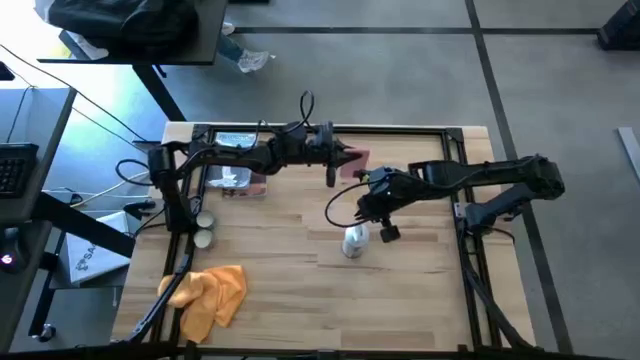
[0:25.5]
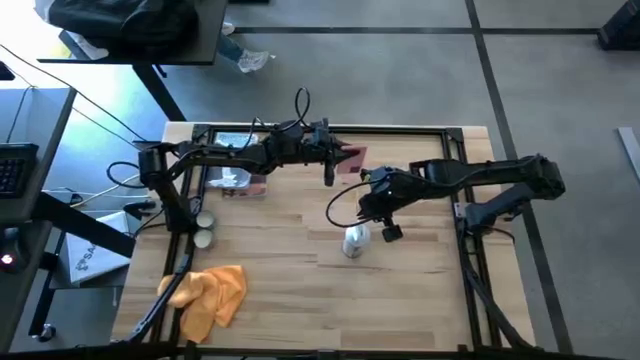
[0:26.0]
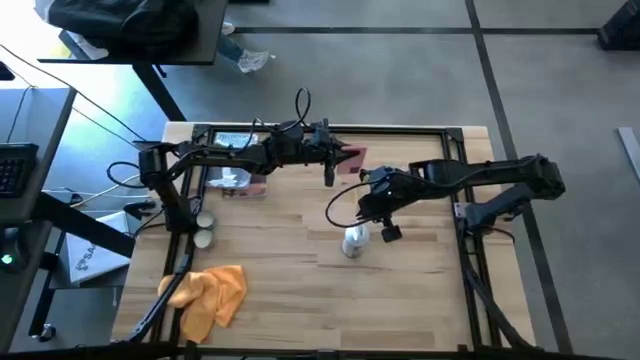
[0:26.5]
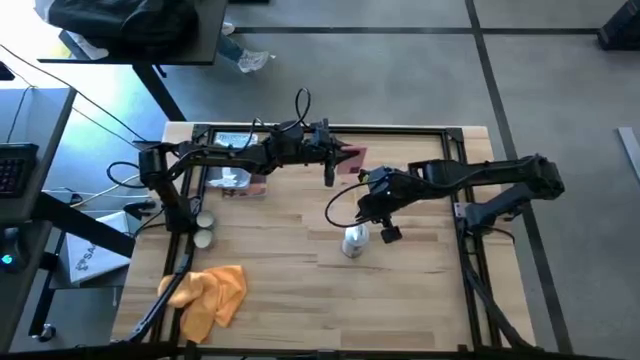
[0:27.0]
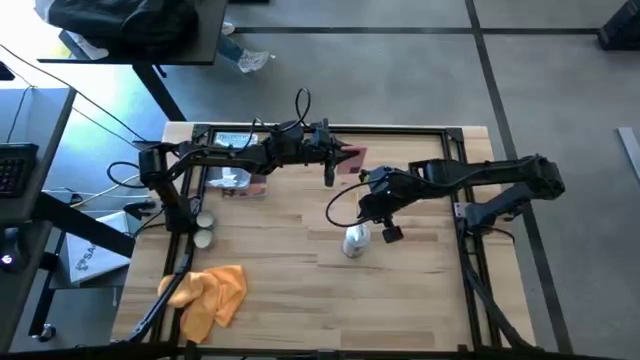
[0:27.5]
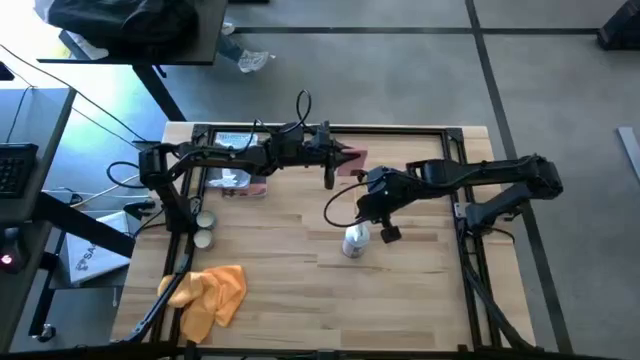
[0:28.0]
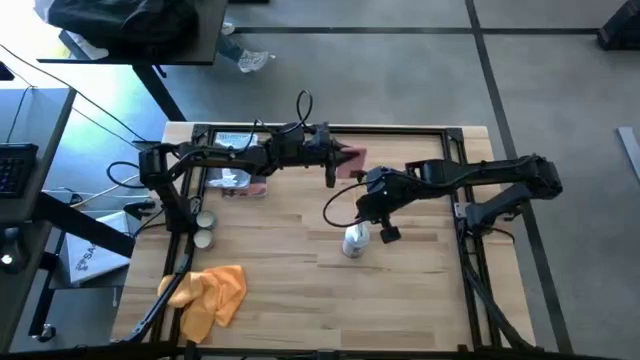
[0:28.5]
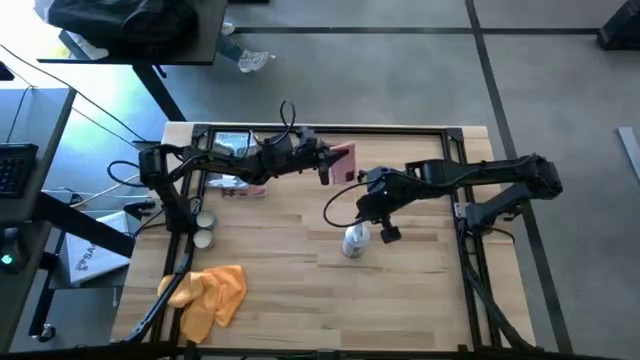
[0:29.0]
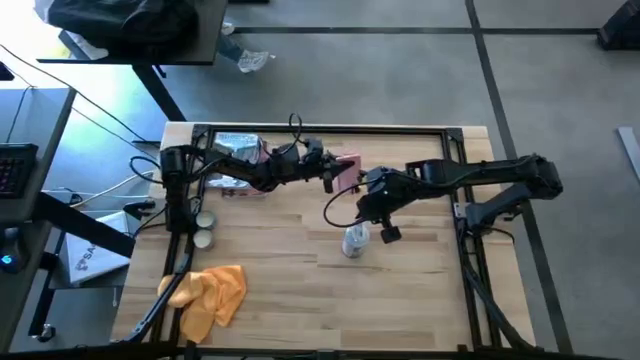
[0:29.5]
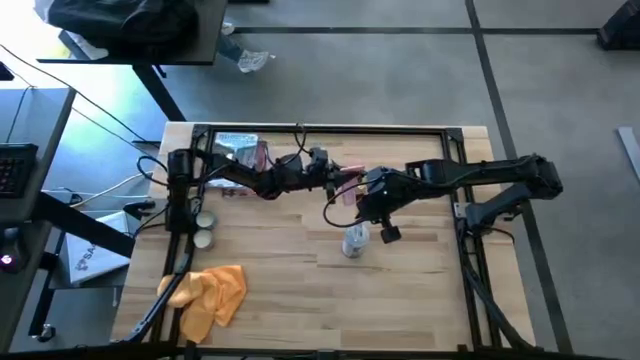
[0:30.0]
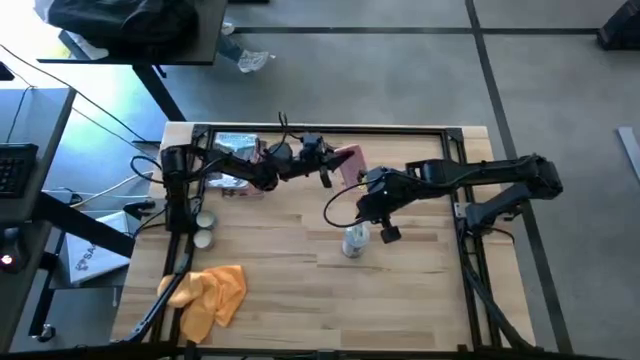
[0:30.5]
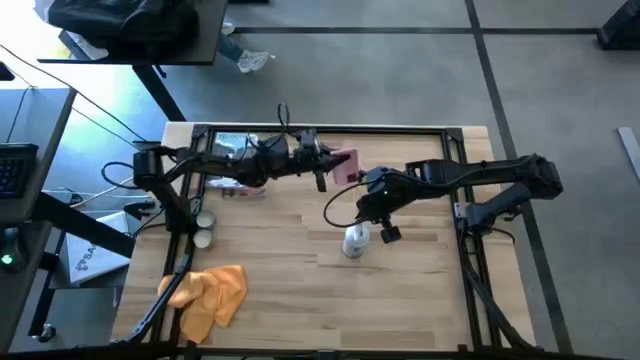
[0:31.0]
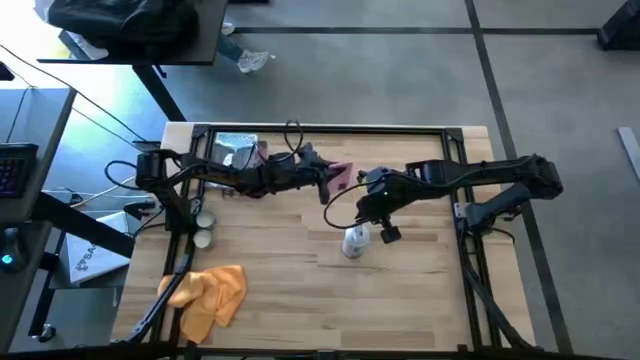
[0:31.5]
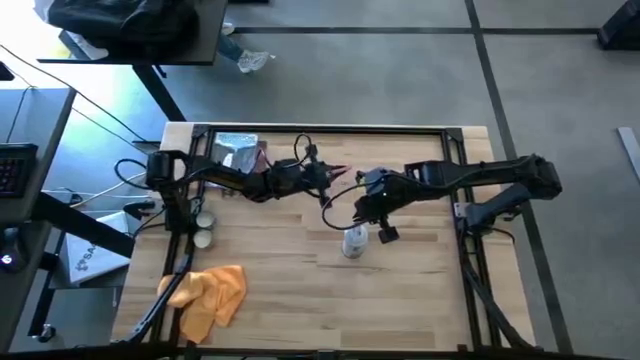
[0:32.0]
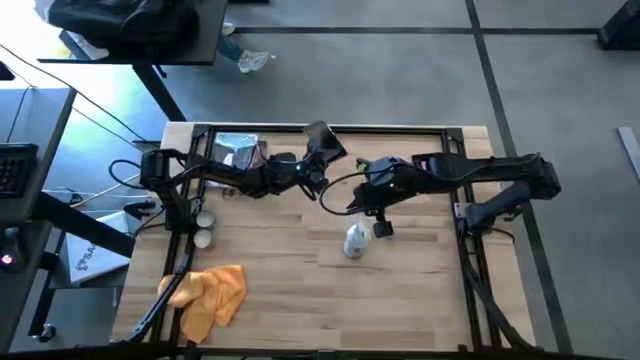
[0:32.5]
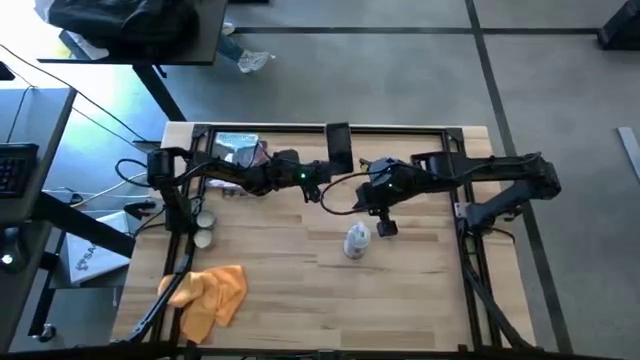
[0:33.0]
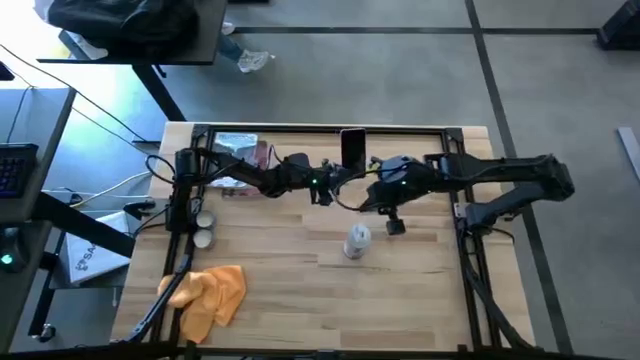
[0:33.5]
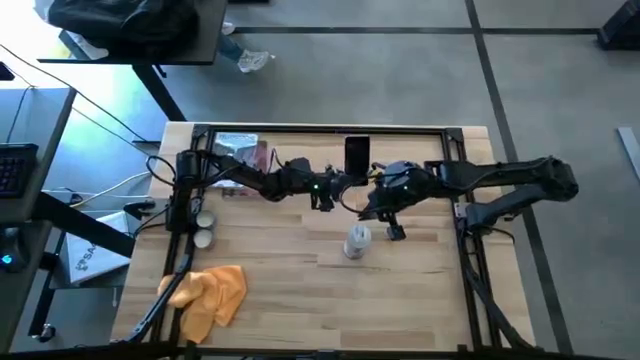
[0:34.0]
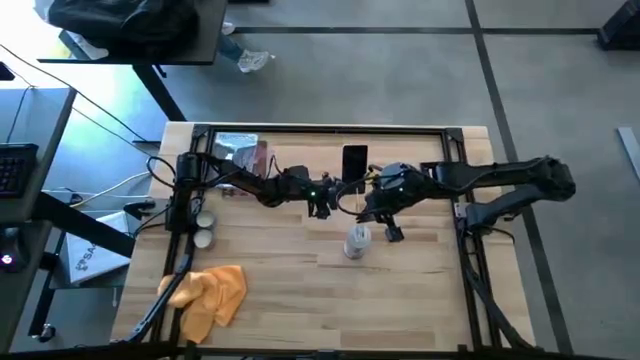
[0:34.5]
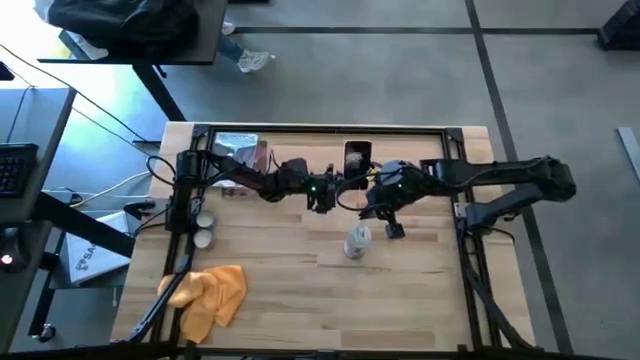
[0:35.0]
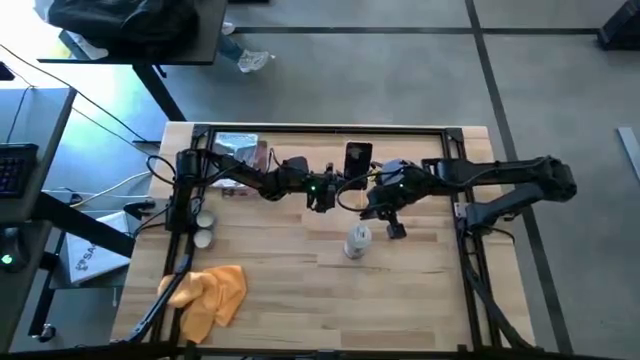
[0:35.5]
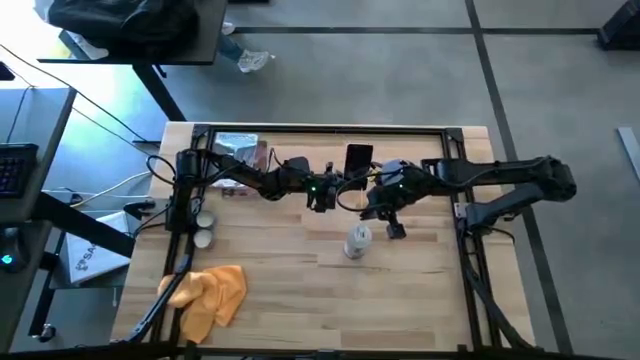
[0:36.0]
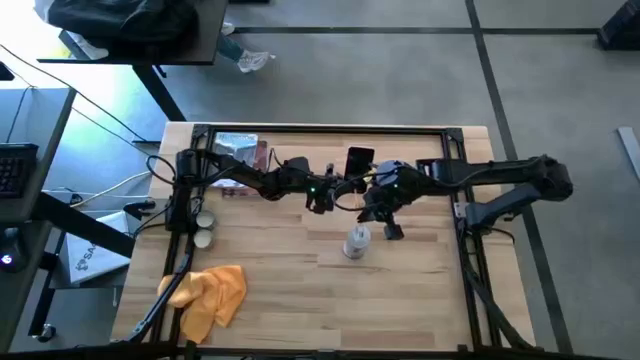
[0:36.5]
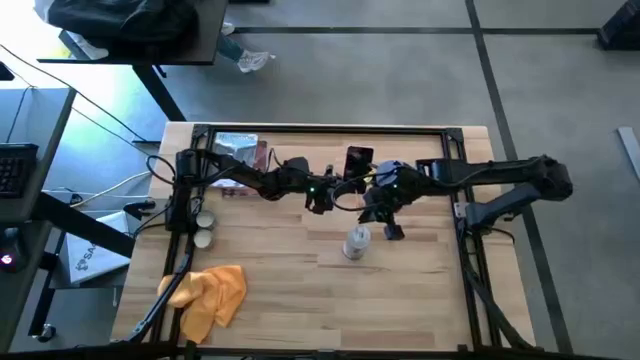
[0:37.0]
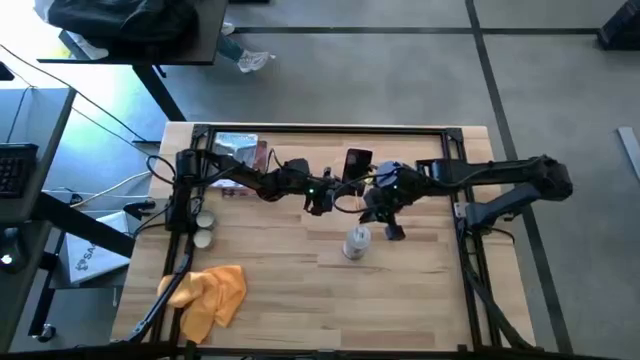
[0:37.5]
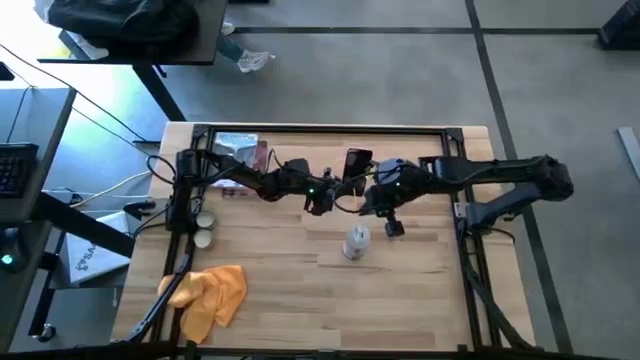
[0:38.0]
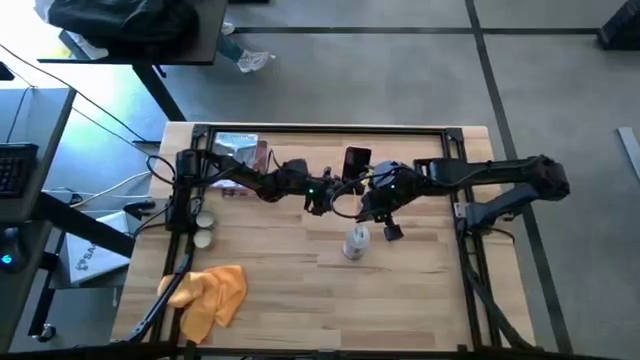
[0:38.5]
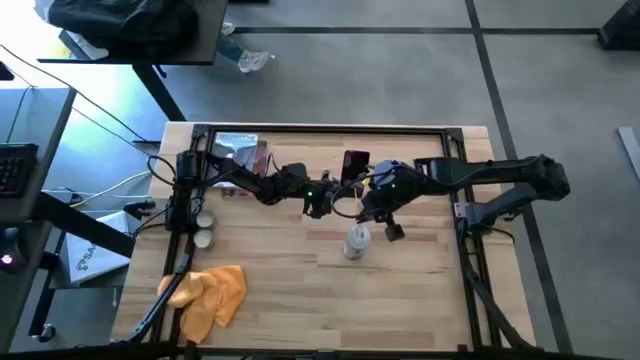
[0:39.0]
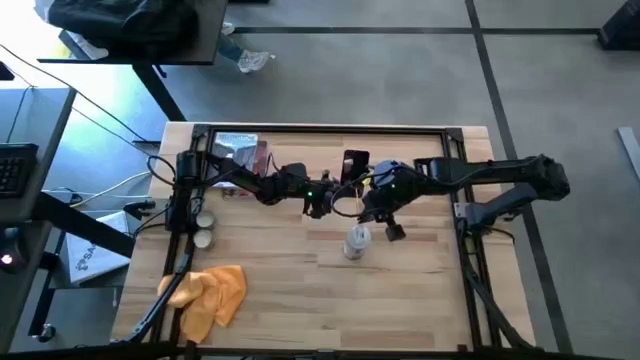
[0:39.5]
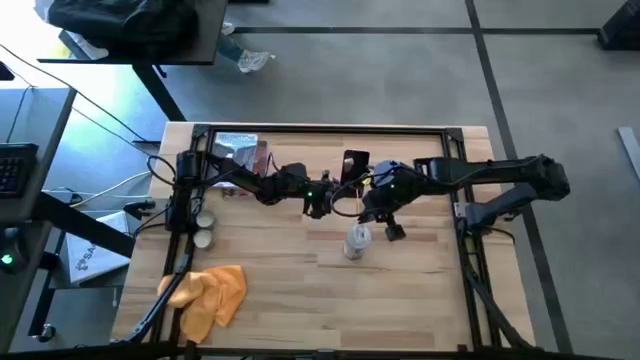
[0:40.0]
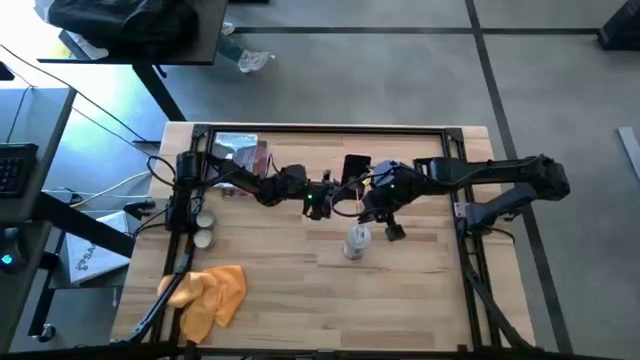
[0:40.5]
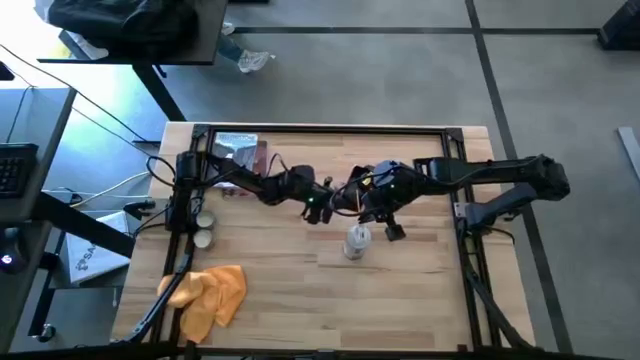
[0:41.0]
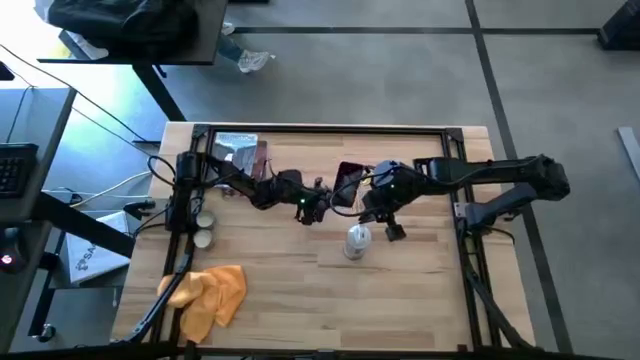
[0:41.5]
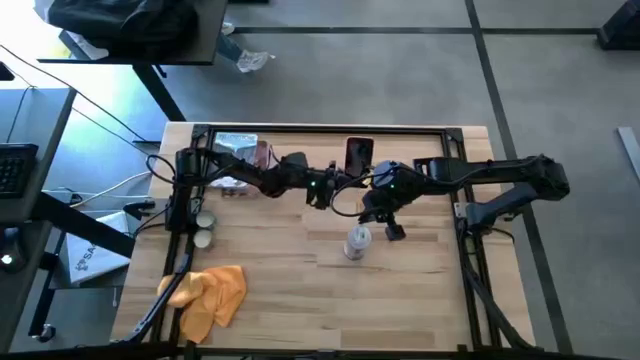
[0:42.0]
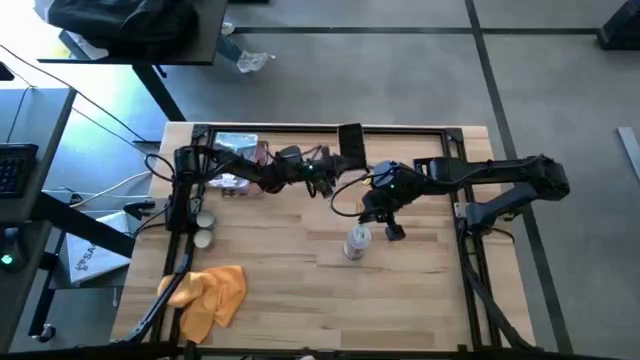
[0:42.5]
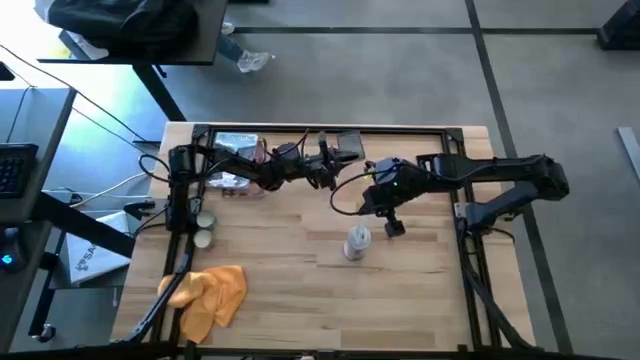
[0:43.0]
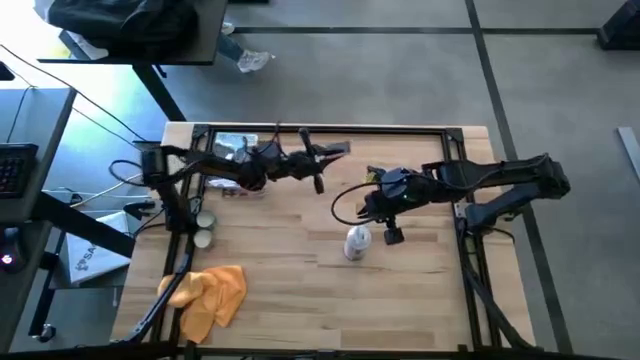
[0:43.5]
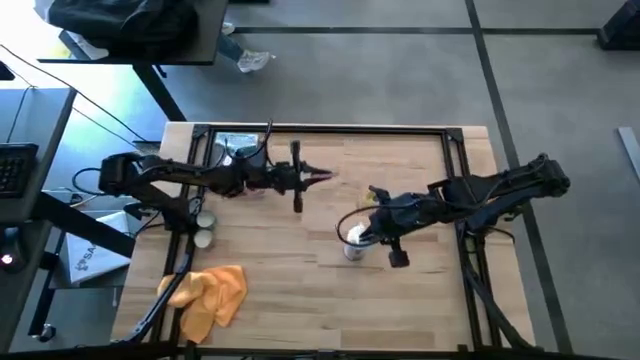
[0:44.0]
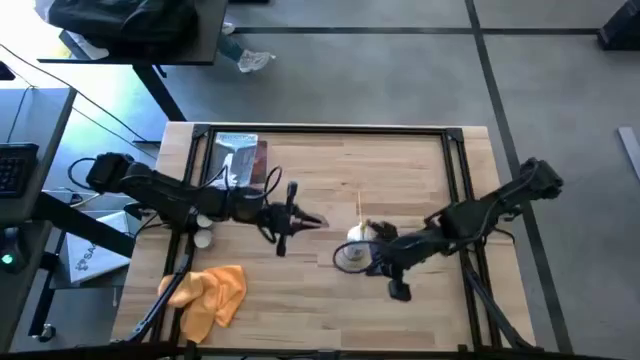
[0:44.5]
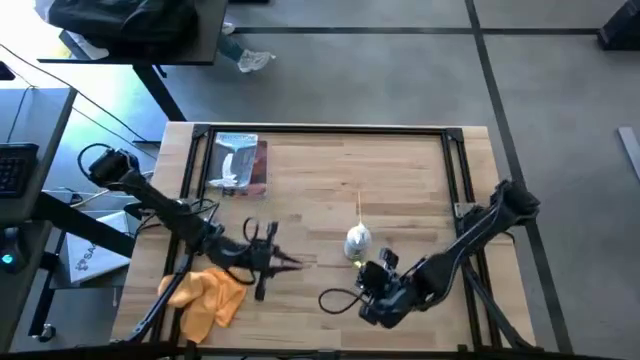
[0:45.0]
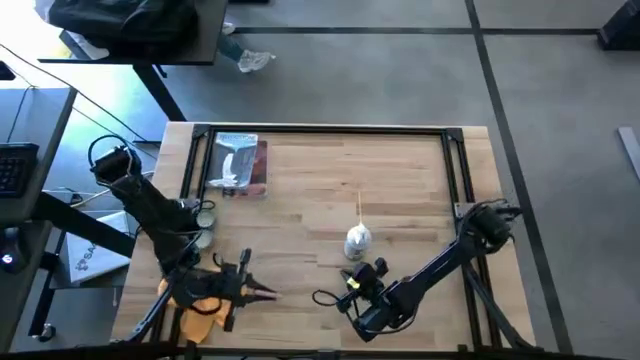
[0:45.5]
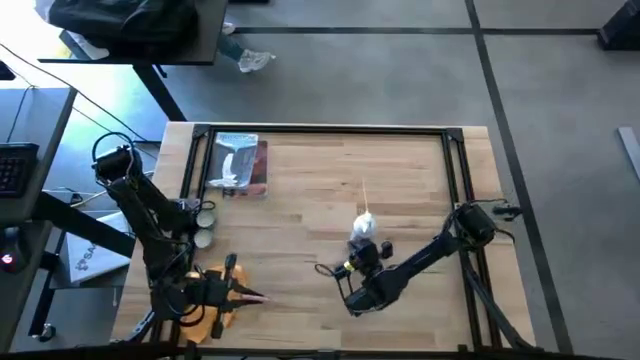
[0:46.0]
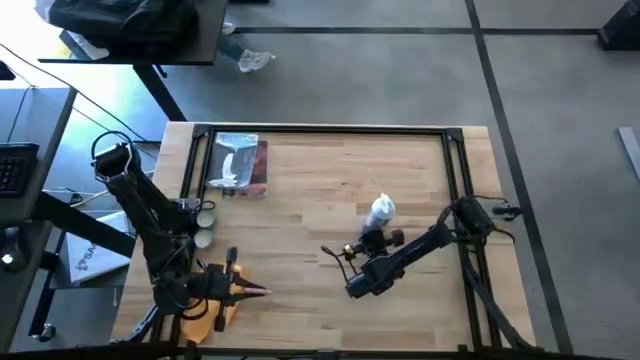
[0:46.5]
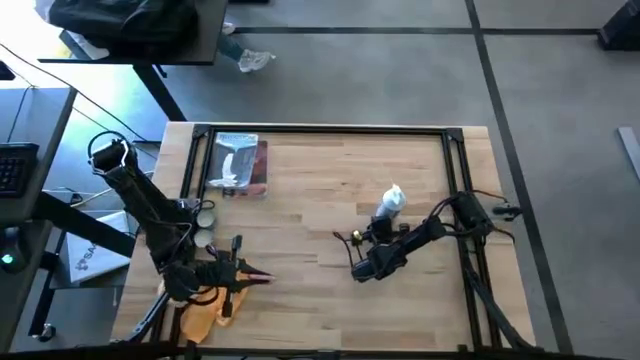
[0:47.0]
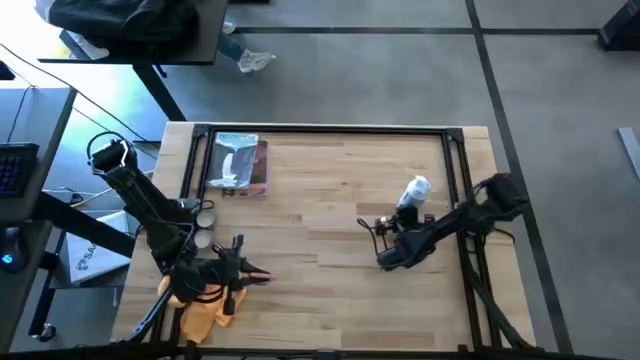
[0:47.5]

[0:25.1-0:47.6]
Task: Apply microfiber cloth
Spray the cellphone on the front and back using the spray bottle
